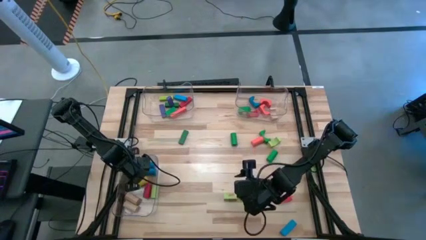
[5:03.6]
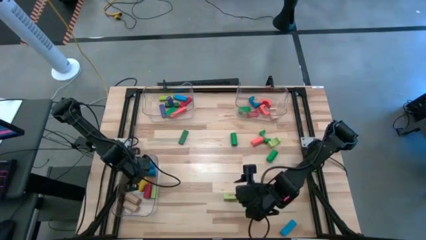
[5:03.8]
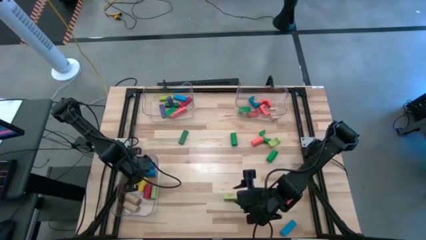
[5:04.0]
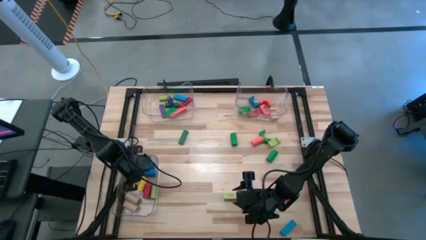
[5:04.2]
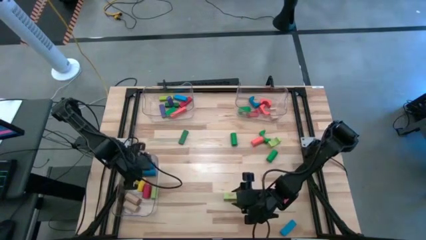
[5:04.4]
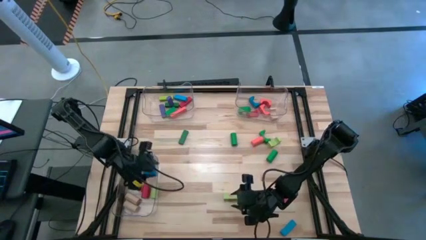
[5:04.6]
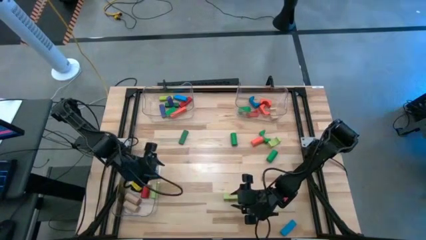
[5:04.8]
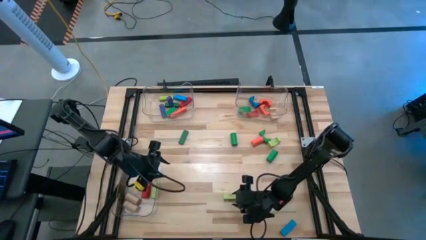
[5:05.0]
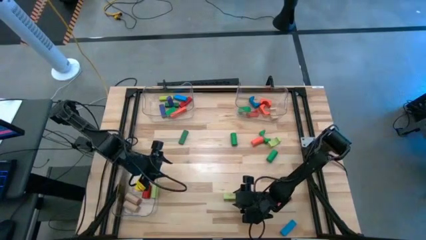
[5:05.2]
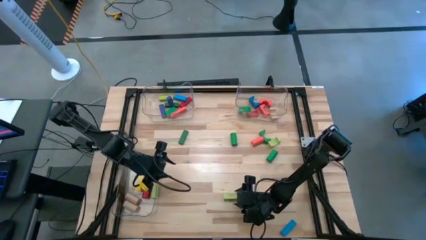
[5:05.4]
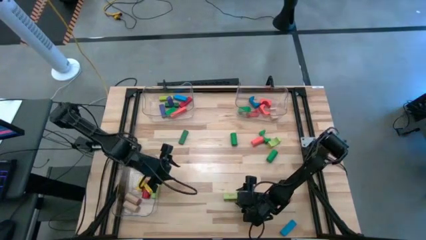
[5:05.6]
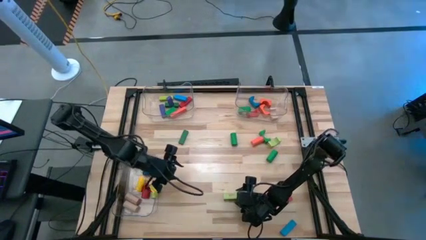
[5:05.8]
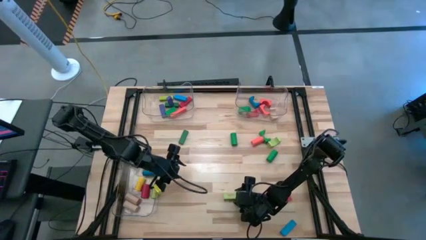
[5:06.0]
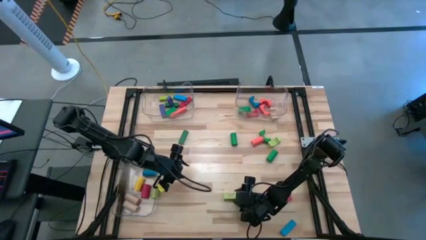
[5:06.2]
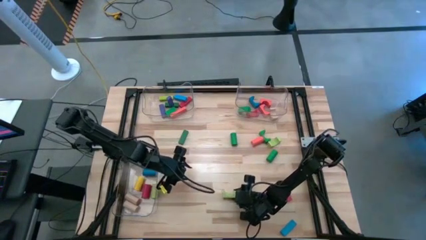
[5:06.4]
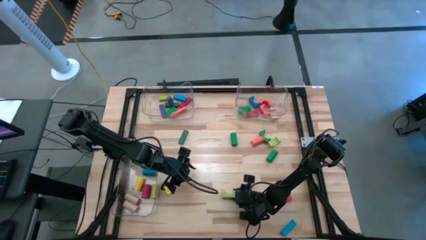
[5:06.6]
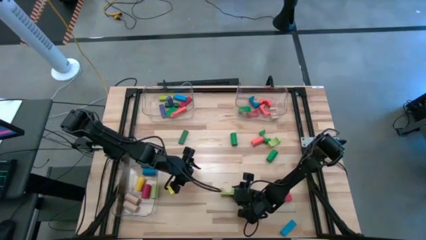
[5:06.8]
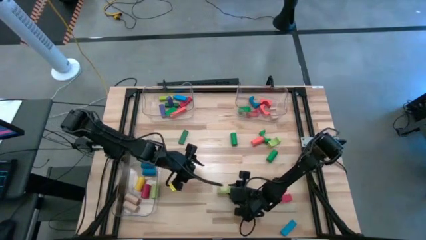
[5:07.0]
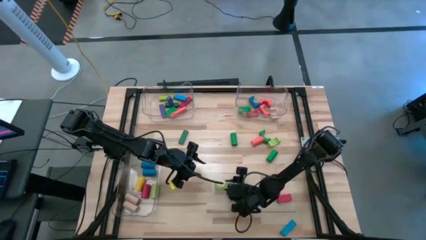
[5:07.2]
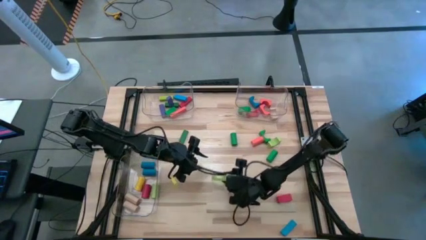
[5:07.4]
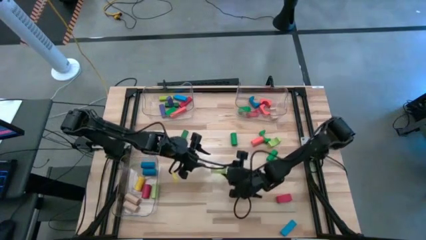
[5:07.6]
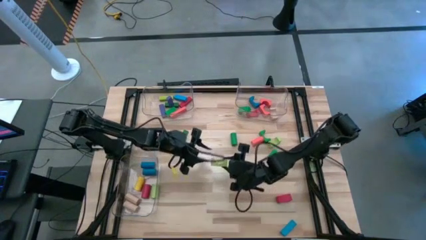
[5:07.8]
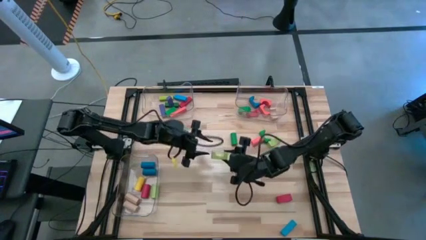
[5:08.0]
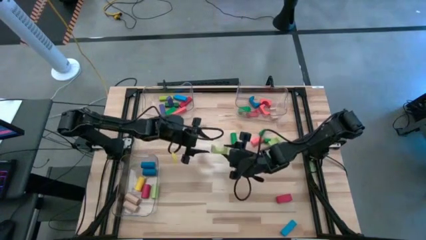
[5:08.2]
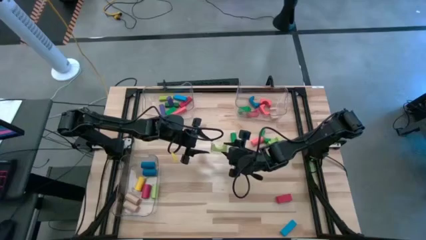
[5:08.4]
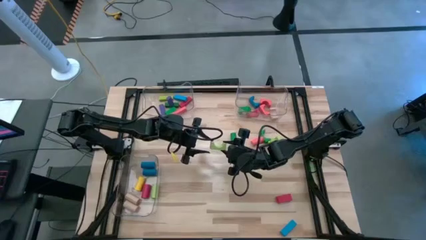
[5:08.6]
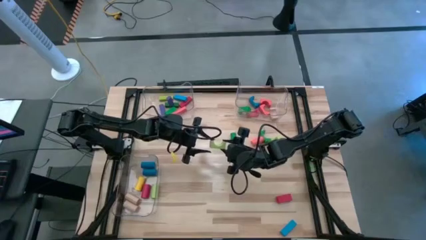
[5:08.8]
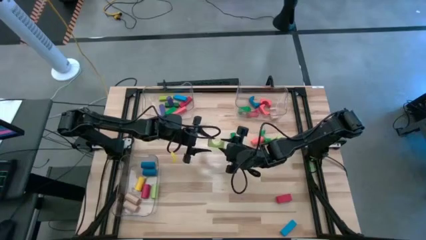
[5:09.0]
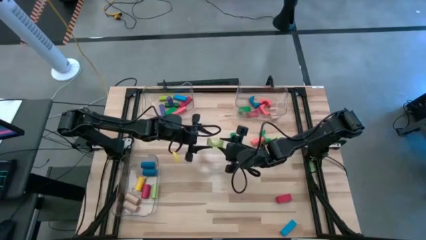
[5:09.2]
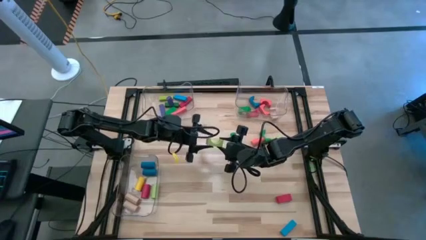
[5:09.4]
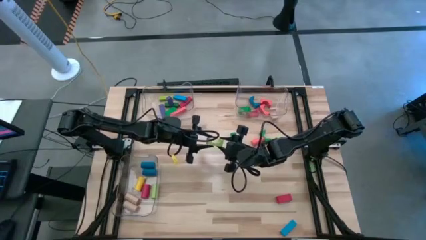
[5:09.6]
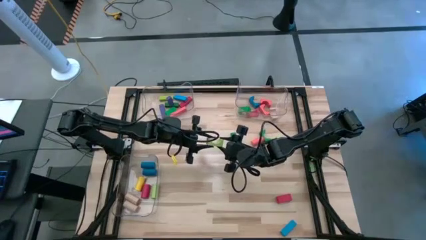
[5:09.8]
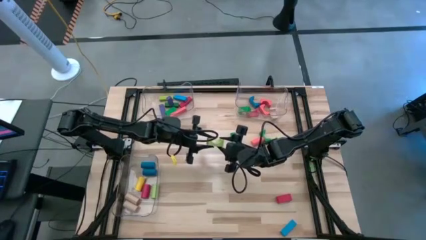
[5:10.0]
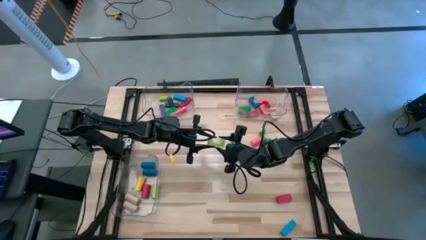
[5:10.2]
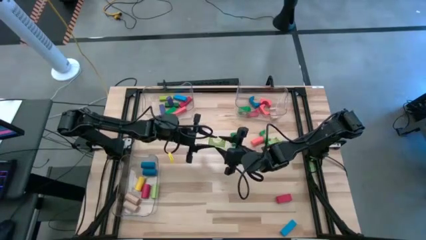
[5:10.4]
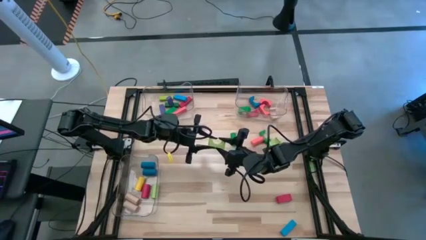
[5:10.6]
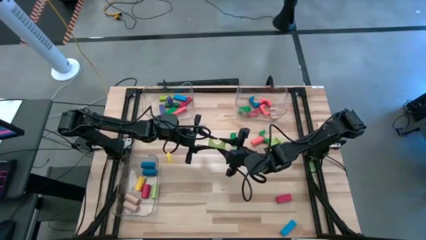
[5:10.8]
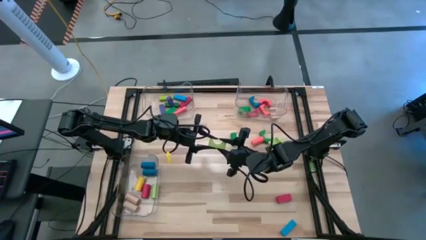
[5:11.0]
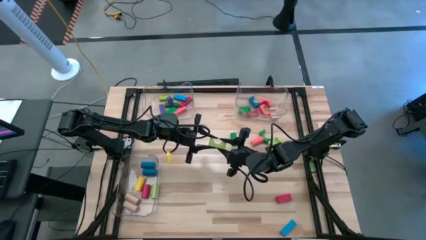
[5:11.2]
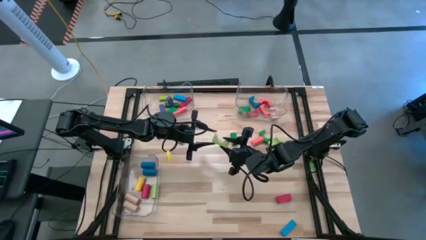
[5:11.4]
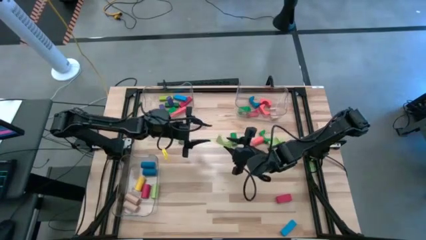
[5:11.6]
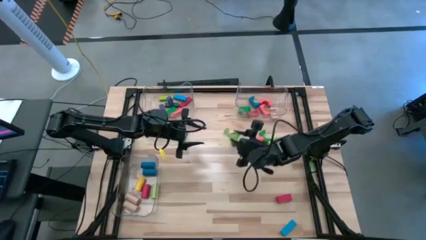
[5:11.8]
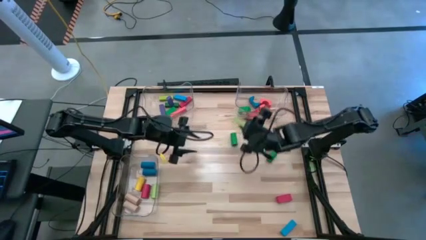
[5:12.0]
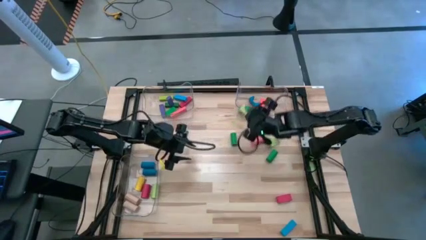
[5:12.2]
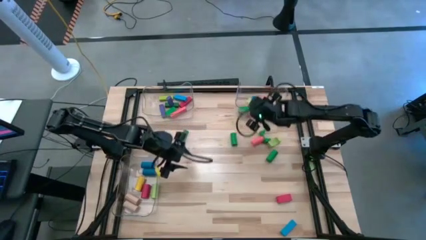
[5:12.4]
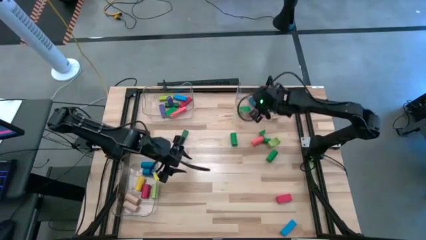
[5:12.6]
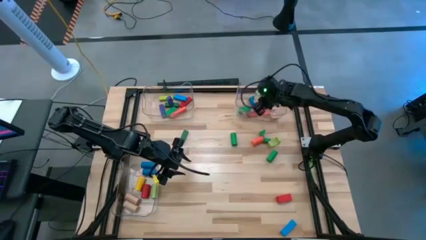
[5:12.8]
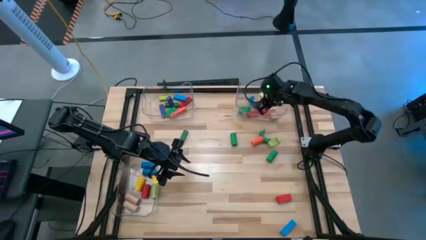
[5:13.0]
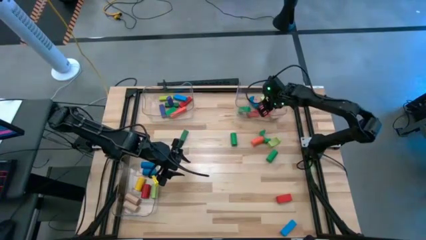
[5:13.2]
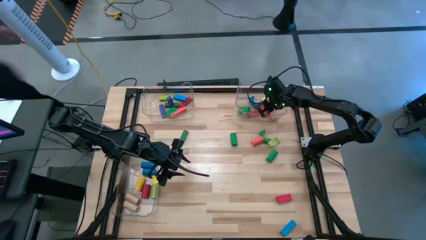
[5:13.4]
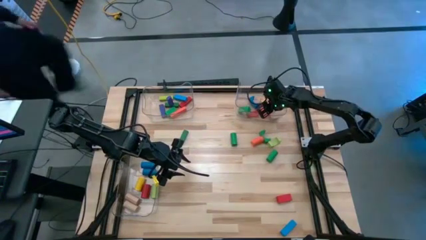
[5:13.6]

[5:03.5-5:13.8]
Task: Sort blocks by size
Put the light green arch block into the top right transparent bin

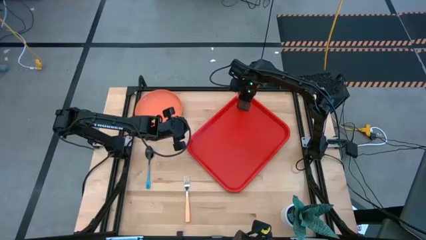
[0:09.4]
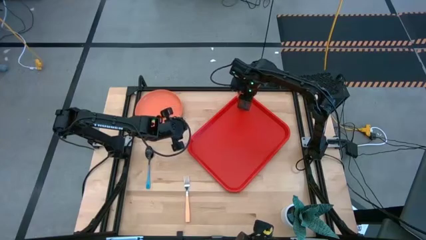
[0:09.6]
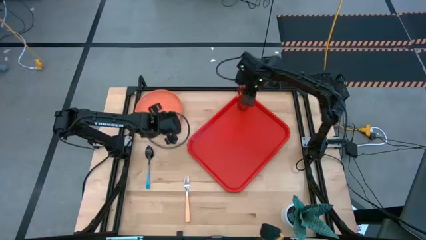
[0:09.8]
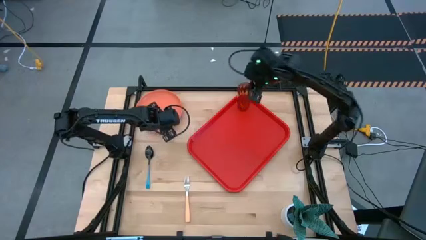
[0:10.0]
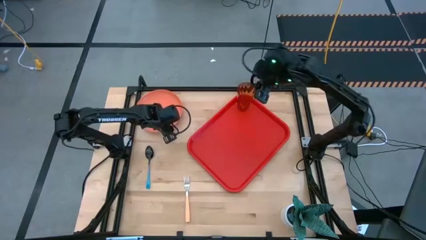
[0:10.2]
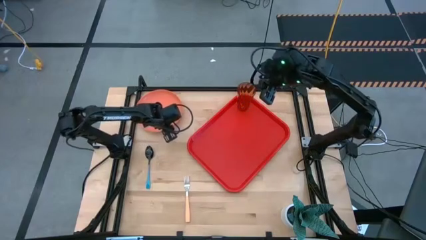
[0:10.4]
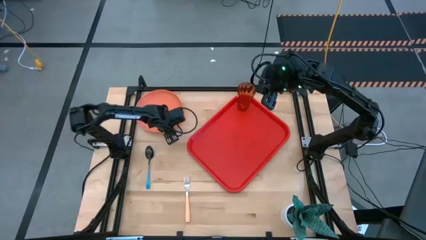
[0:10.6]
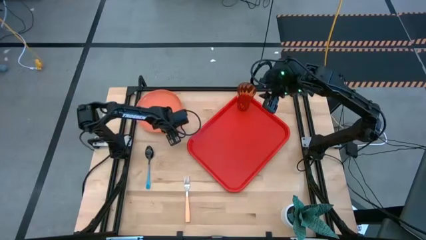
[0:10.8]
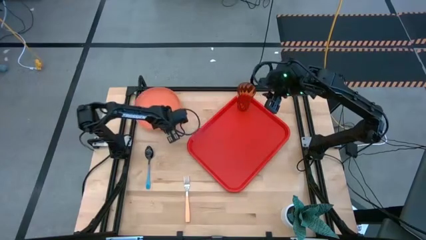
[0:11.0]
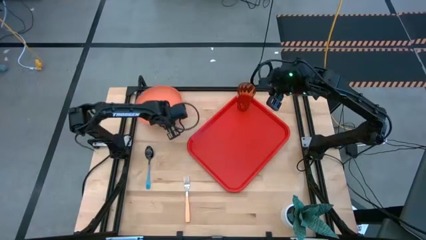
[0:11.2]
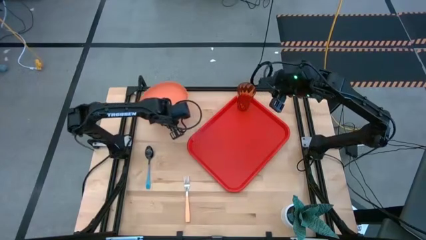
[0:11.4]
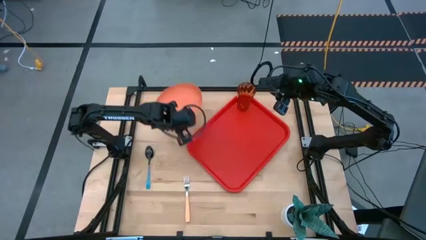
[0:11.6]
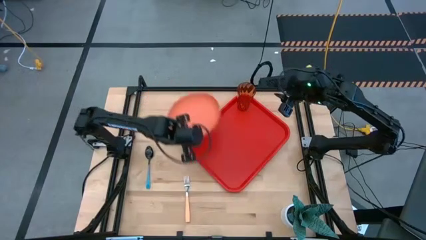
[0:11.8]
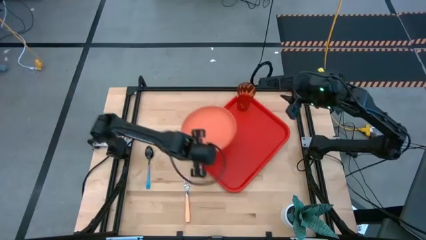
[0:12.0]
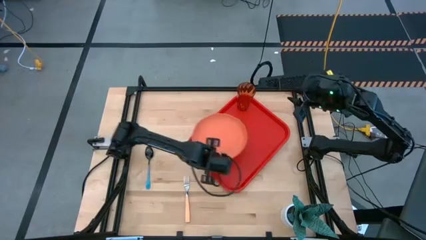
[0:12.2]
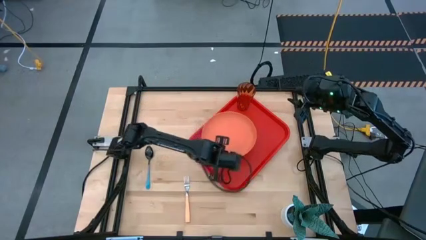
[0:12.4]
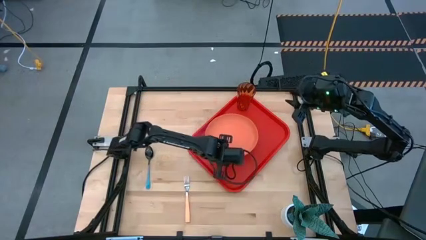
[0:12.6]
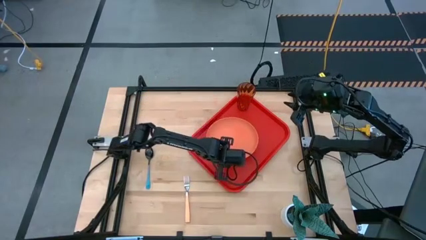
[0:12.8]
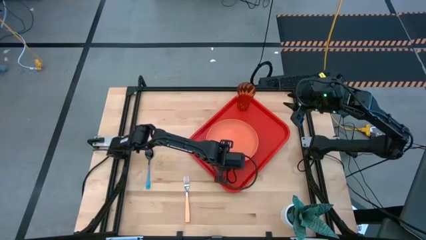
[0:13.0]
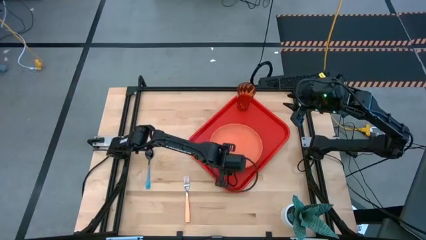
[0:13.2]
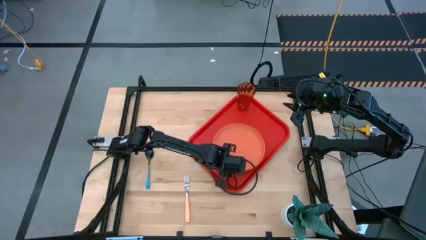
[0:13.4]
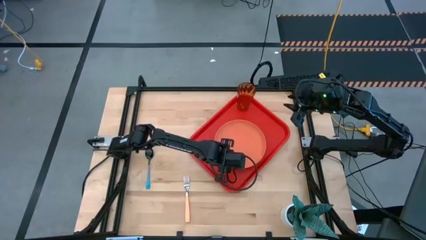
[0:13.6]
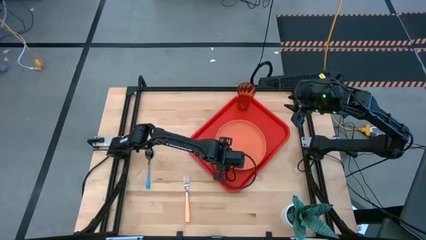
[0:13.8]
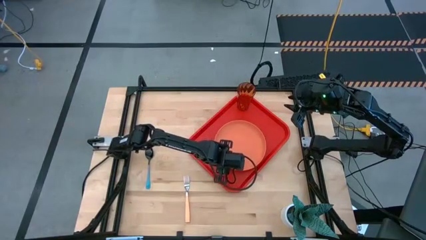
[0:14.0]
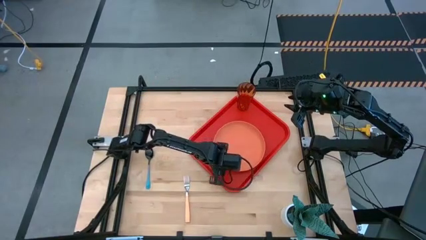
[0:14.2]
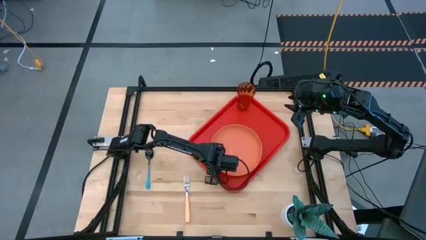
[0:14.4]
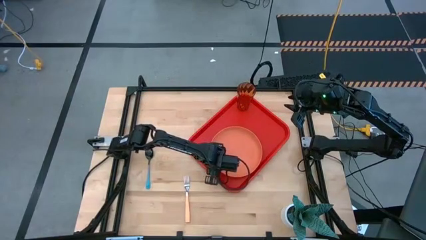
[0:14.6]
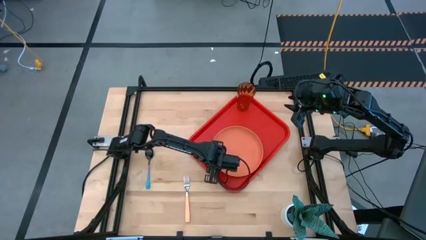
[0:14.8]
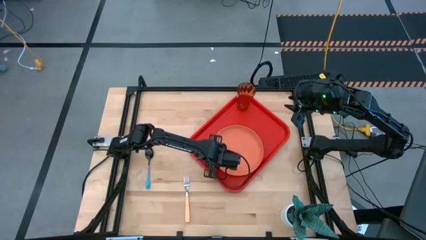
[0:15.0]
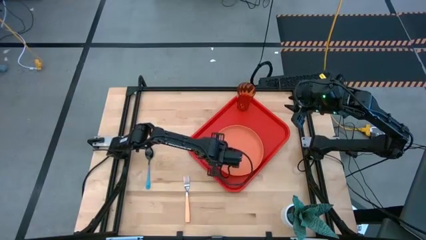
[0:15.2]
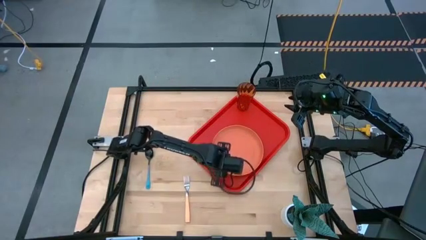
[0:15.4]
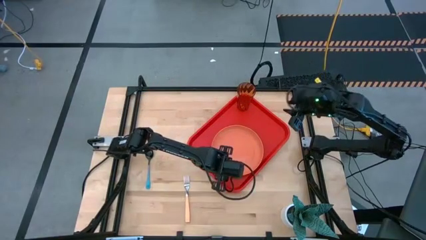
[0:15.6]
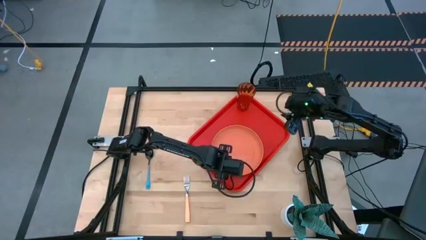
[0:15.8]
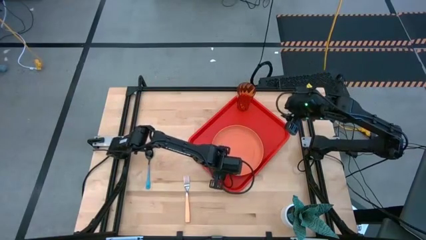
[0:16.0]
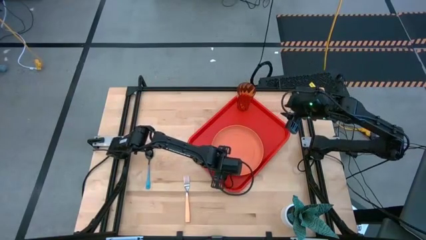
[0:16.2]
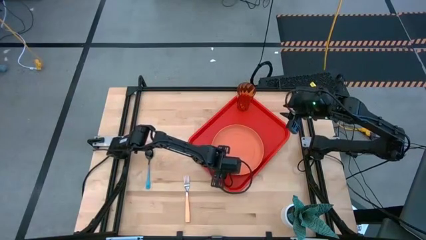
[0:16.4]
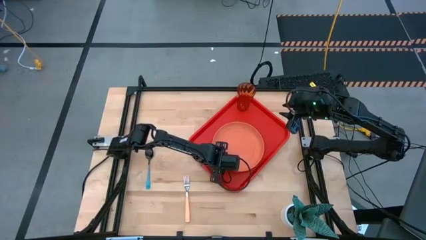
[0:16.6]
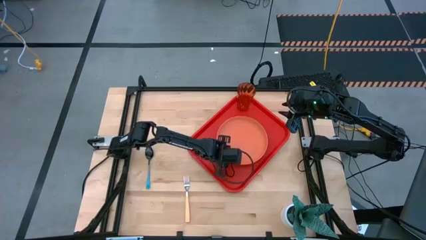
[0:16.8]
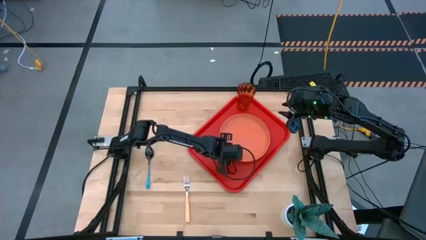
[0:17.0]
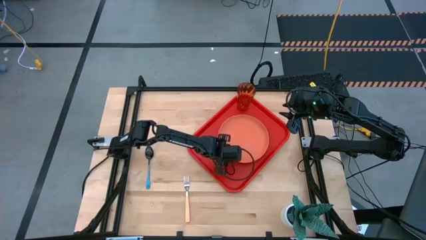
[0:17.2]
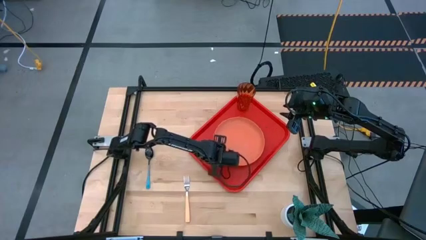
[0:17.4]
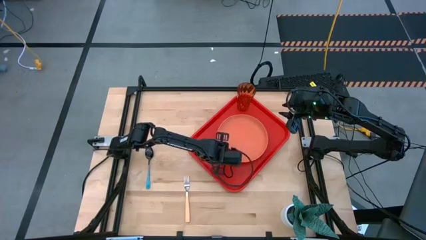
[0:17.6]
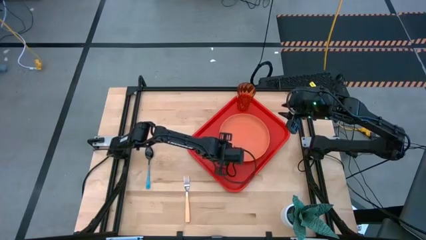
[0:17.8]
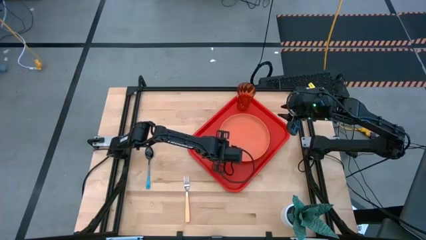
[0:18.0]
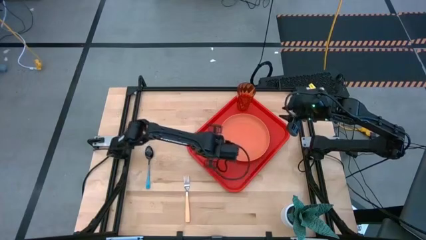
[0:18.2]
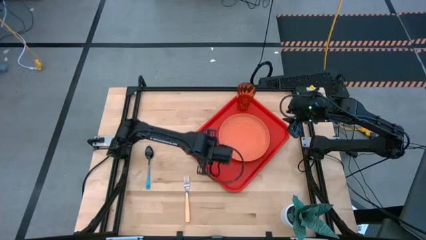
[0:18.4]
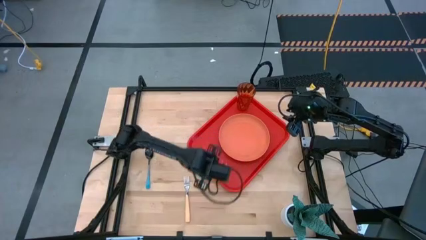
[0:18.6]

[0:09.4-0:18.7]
Task: Pick and place plate/cup/fork/spoon on tray
Put the orange plate on the red tray
